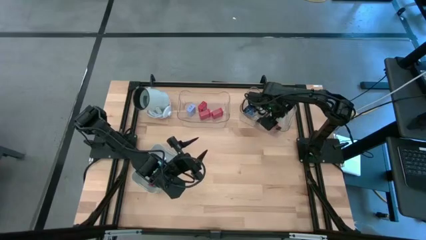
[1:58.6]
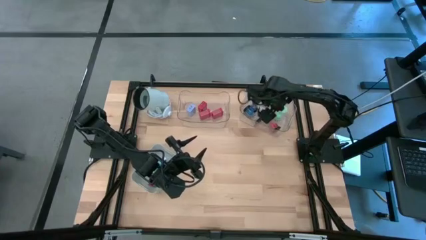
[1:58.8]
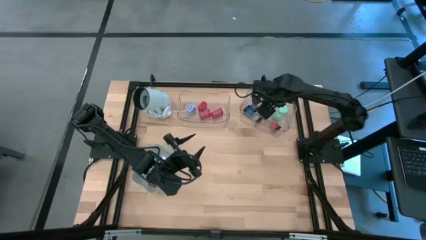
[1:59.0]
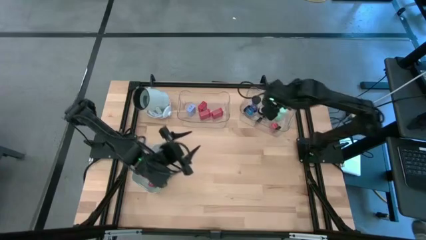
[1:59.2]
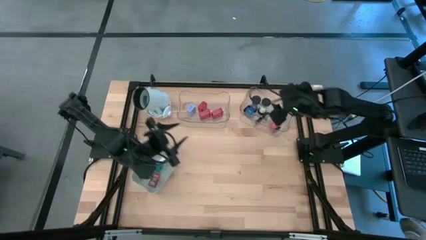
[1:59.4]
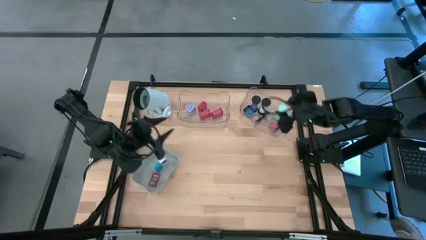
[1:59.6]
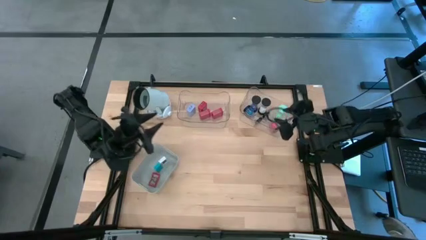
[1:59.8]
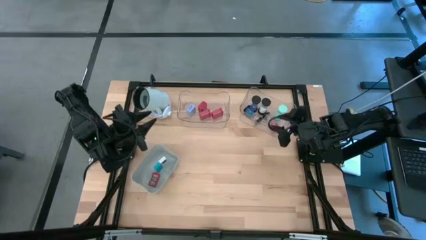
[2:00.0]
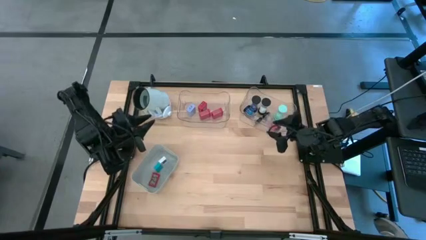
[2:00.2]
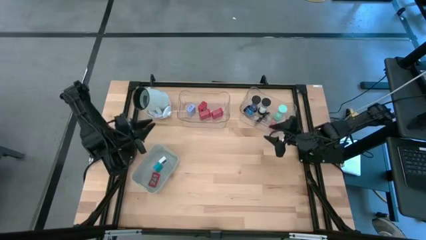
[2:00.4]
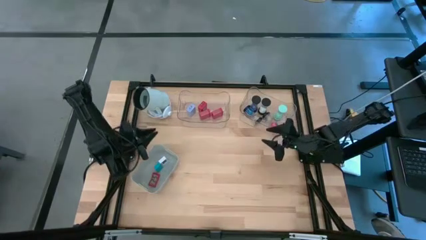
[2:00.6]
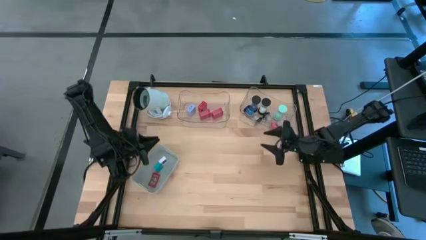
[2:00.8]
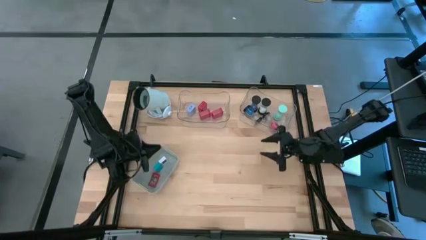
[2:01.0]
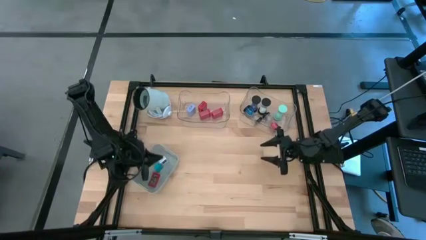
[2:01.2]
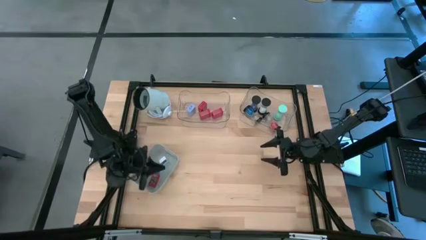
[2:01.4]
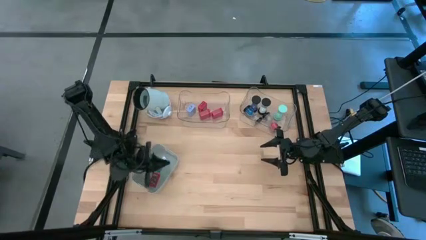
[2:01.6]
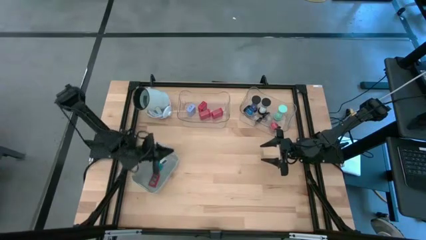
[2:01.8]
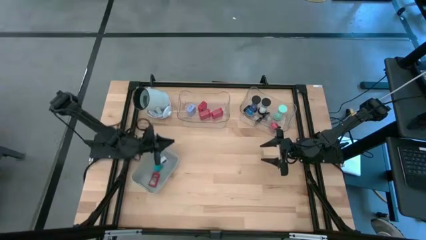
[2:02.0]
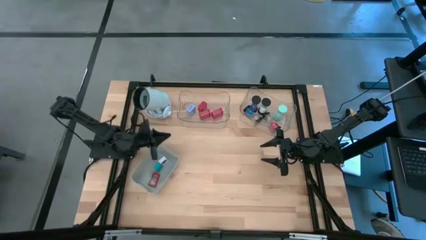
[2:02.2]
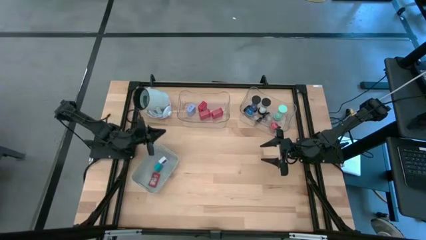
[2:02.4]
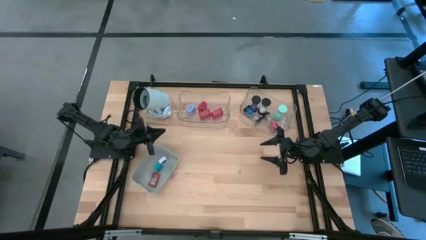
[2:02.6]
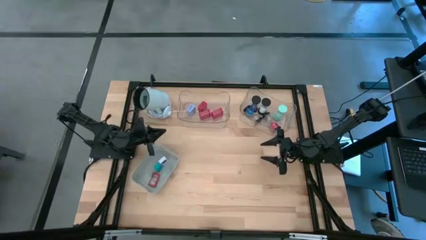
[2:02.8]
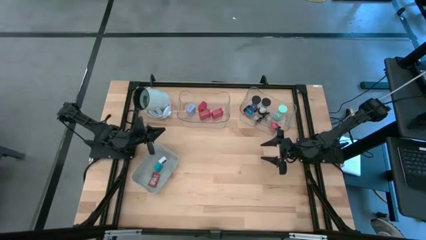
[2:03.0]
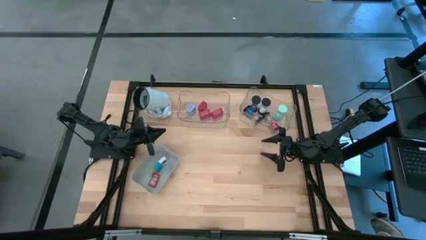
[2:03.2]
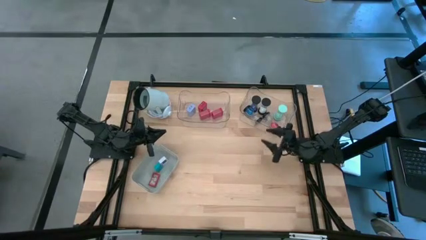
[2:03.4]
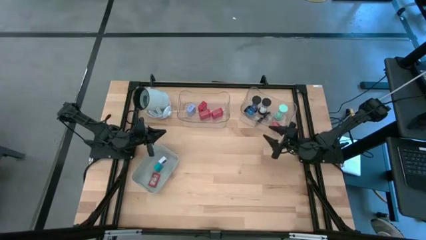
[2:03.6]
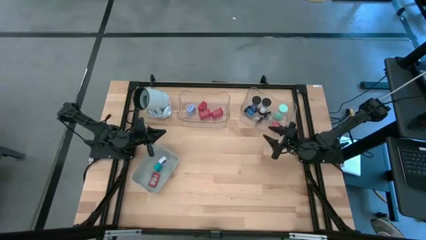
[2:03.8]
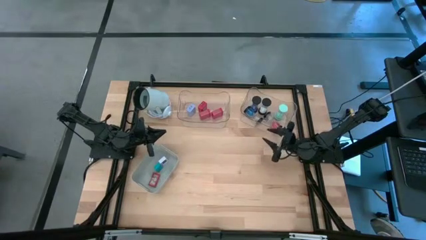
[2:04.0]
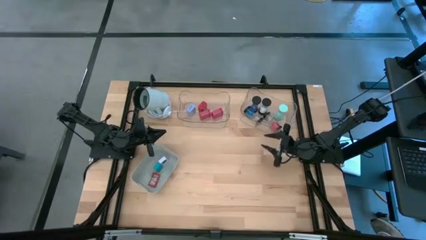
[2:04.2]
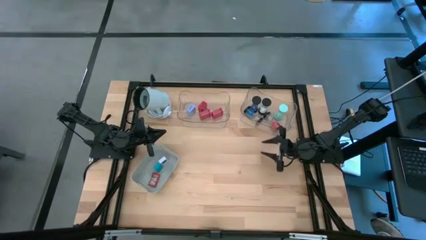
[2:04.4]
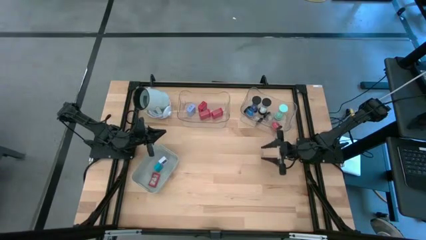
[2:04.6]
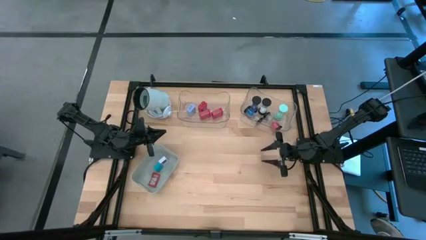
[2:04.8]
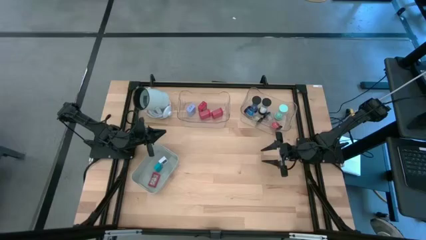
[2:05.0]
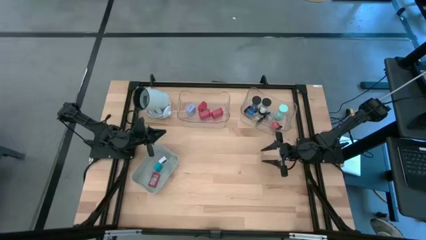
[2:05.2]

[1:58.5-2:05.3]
Task: Pick & Place Office items
Return to Home Position

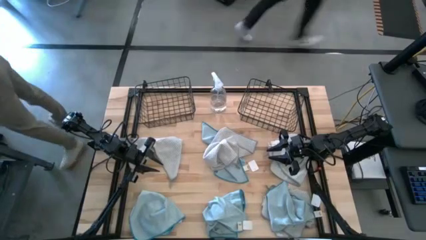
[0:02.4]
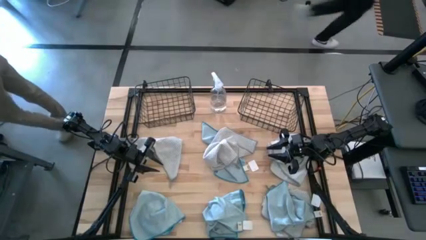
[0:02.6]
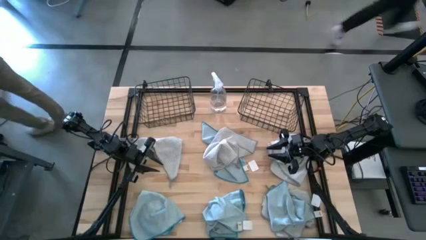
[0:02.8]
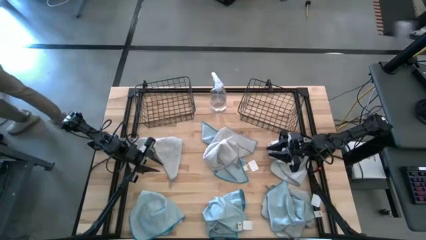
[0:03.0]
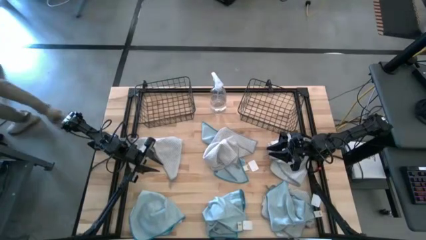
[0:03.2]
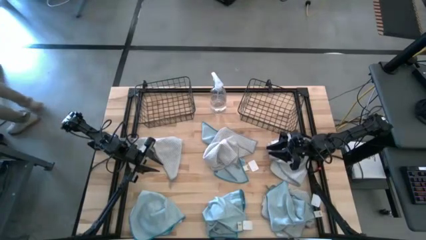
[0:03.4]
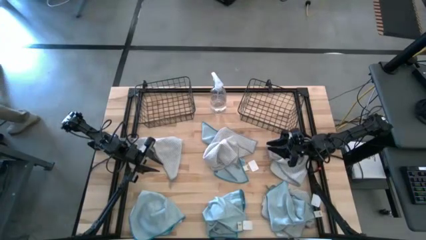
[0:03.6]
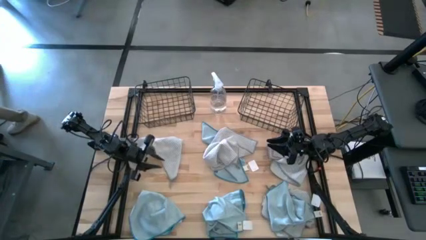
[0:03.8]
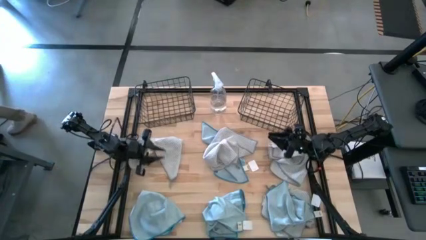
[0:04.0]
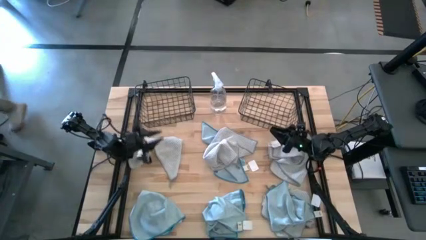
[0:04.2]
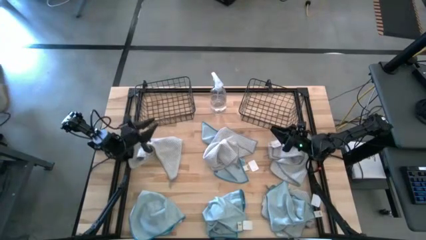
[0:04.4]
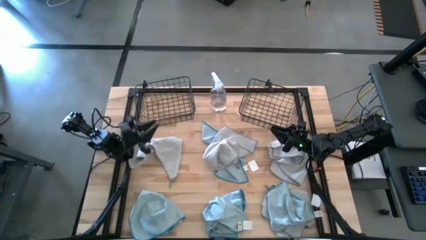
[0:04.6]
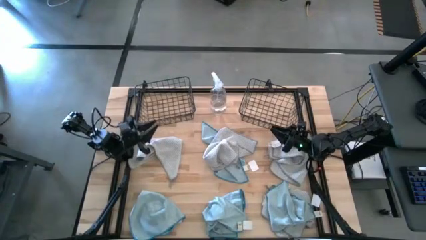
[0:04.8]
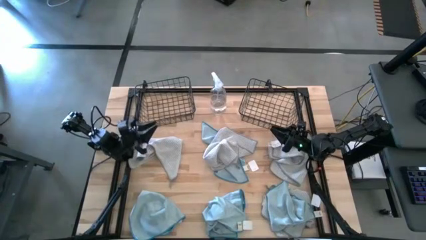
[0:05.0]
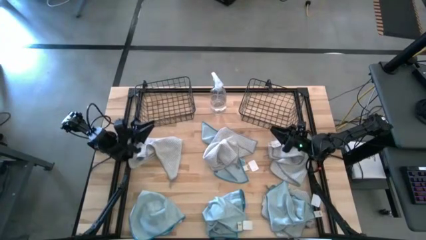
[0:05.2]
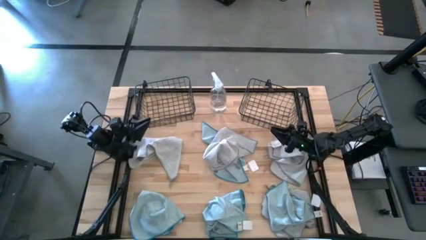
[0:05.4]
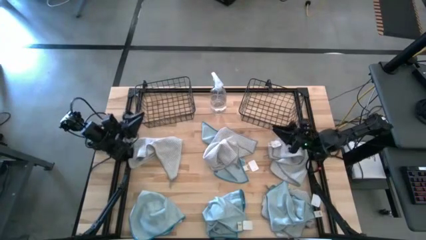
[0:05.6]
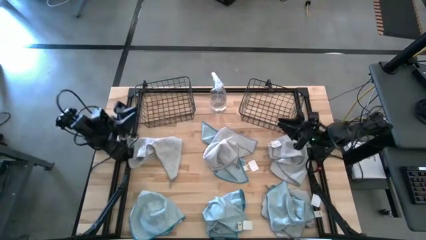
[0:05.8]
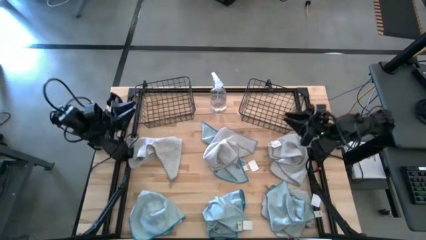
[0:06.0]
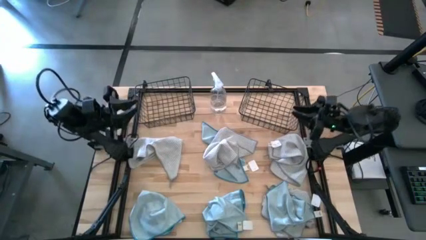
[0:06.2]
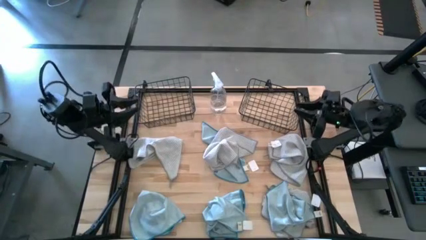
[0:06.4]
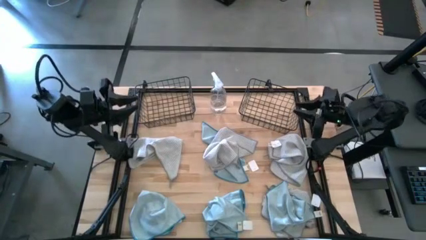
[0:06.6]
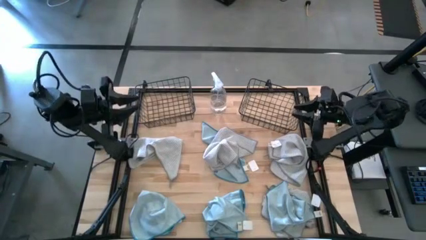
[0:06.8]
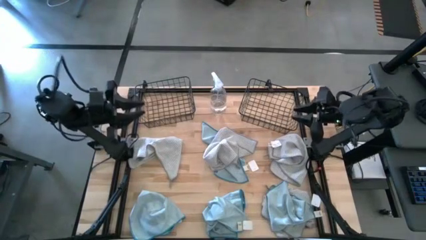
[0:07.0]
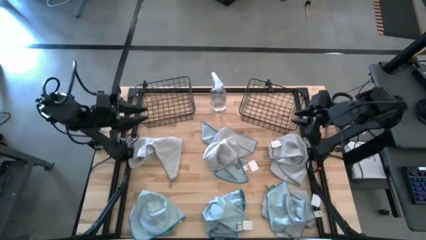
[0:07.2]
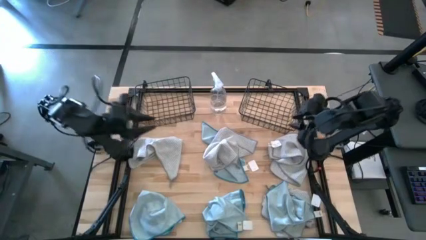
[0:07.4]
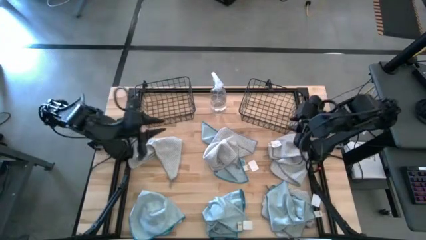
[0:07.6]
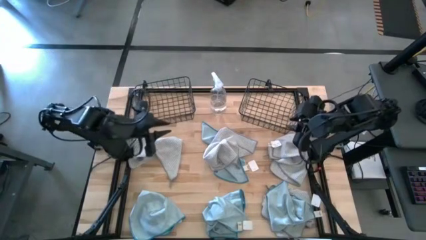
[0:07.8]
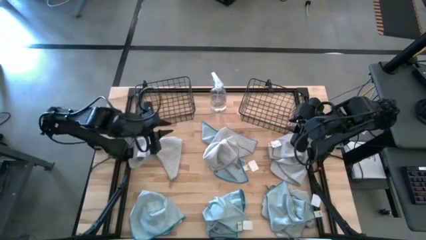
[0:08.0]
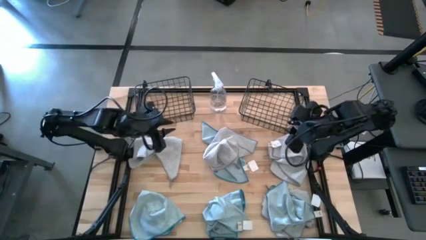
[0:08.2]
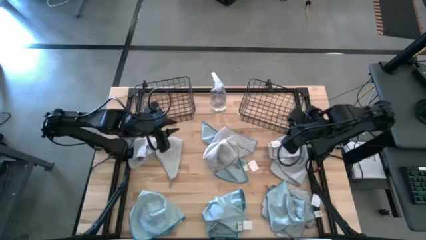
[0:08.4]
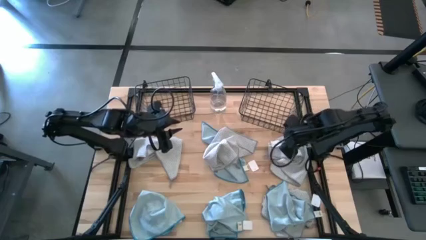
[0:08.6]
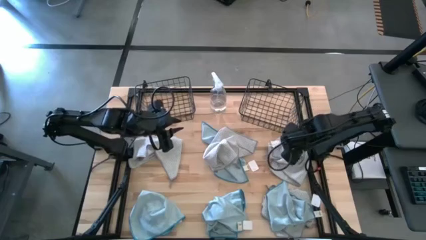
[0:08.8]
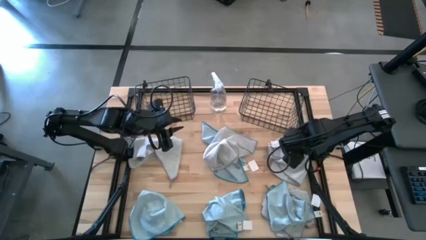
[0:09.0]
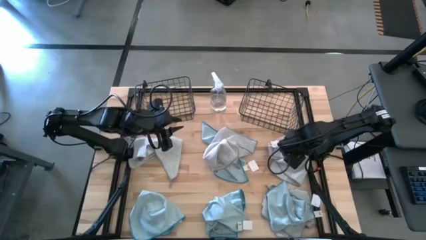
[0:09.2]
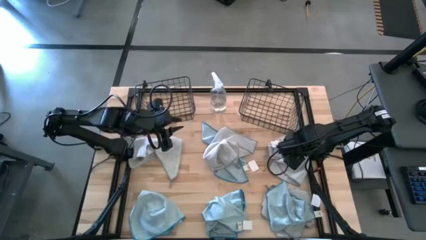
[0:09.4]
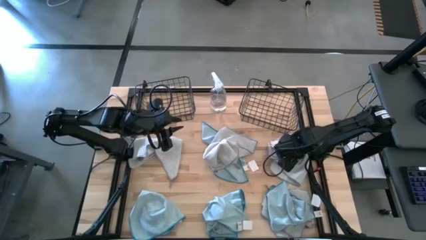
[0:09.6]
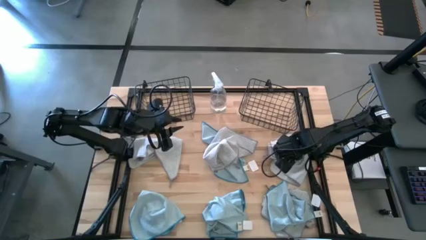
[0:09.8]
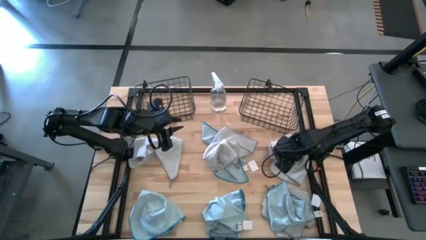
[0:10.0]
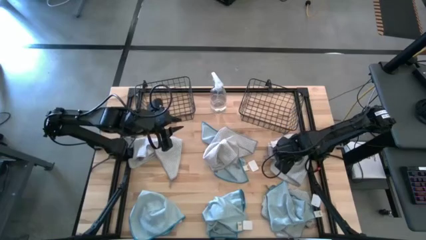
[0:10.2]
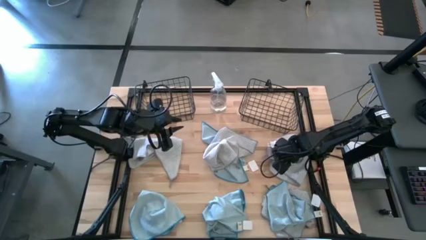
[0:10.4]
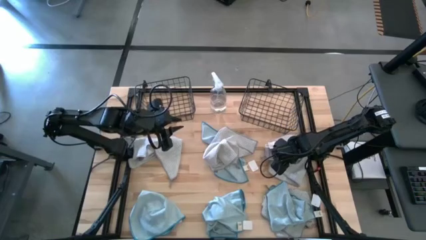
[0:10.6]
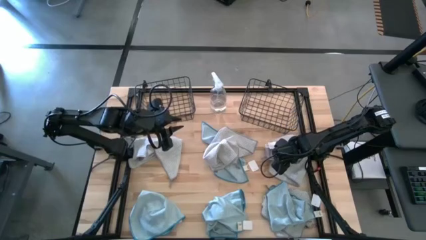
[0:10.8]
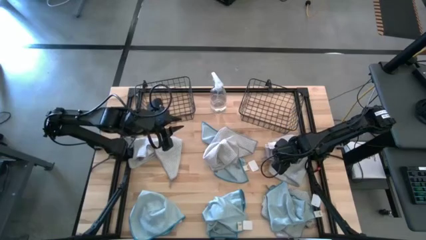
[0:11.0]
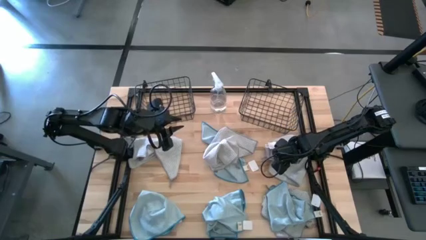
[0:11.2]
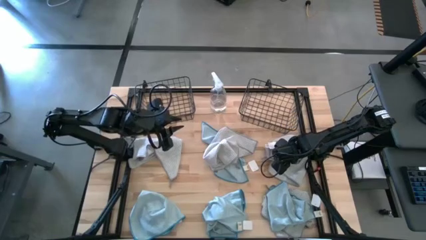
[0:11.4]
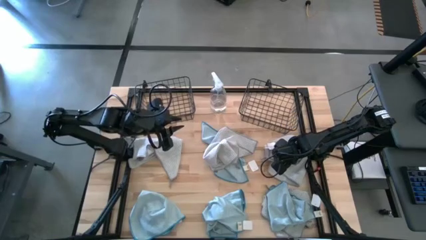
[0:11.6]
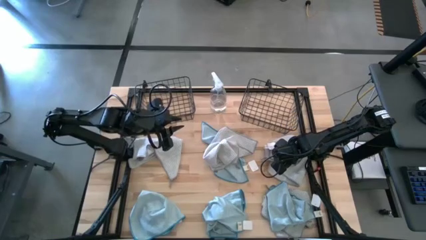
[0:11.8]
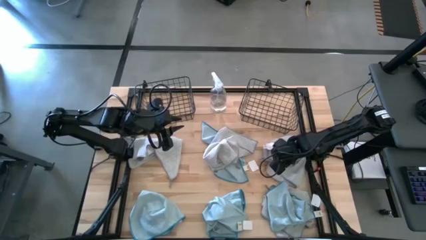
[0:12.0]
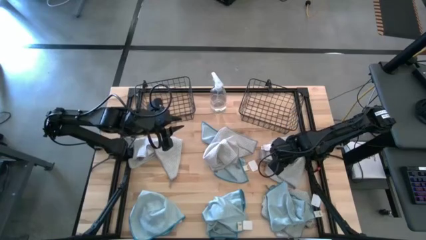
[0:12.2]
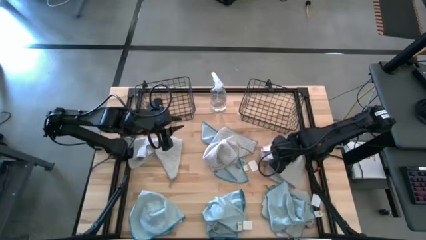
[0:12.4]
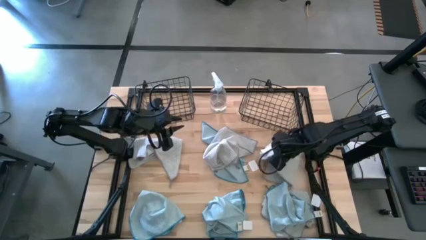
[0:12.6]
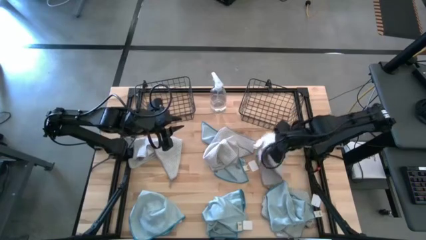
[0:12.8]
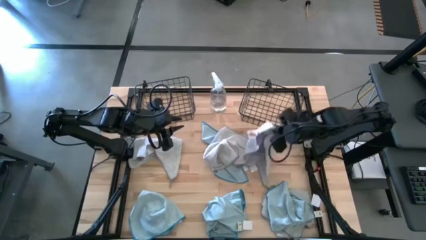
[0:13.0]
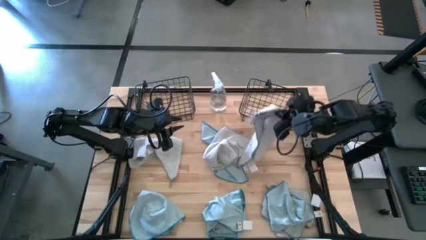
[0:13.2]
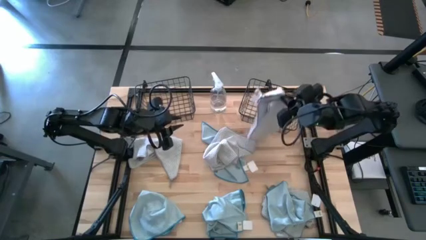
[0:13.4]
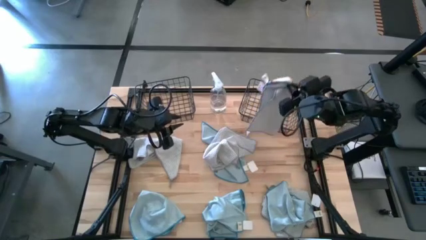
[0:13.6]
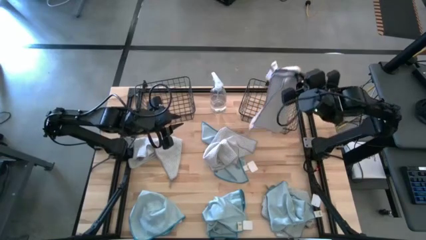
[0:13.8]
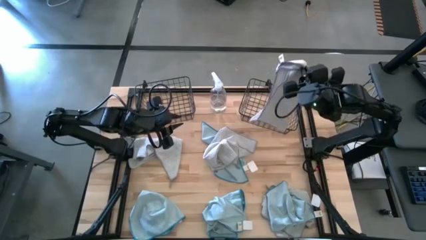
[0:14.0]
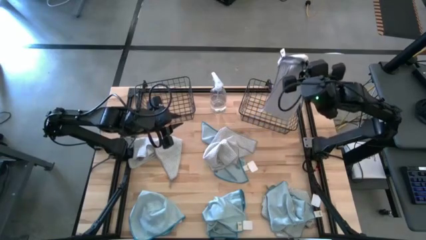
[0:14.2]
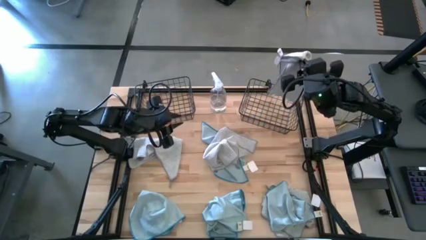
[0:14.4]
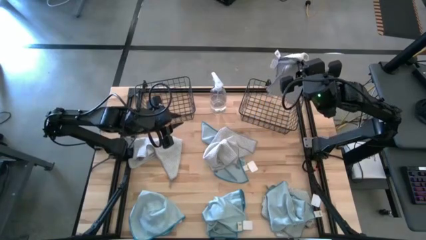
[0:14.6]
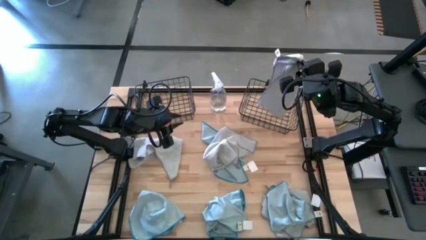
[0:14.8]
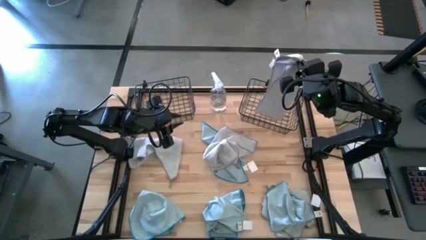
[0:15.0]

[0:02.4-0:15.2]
Task: Sort microfiber towel by color & place in baskets
Put the gray microfiber towel into the right black wire basket
